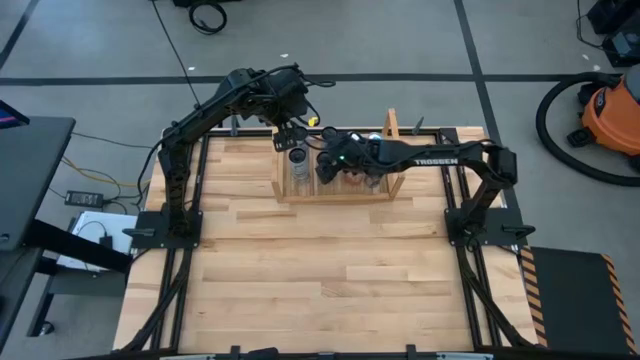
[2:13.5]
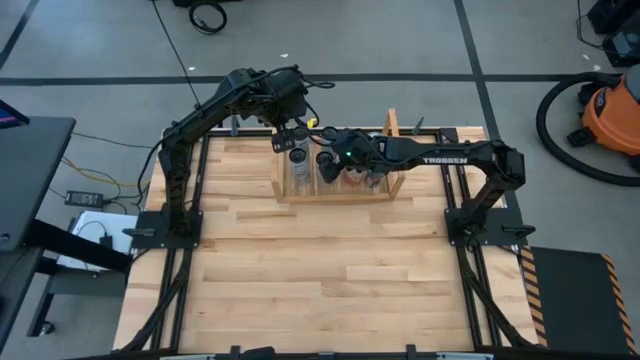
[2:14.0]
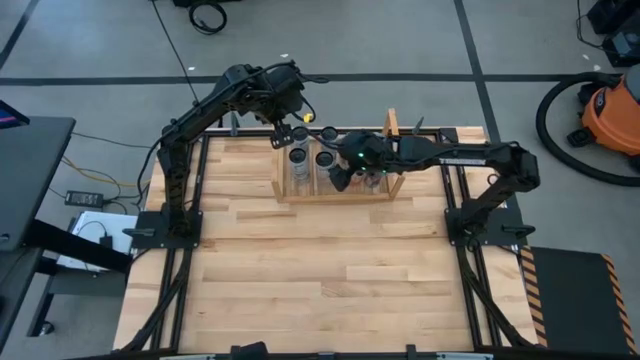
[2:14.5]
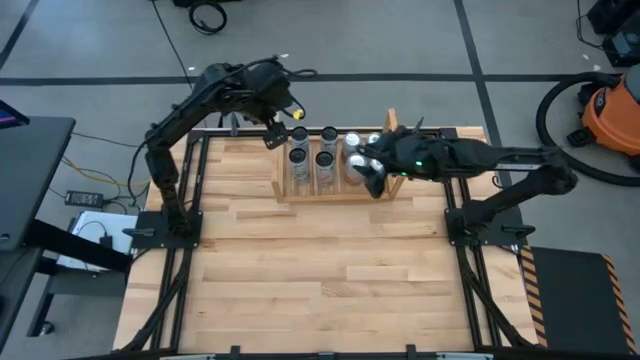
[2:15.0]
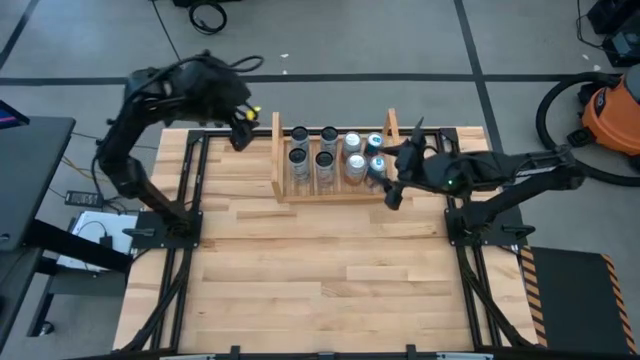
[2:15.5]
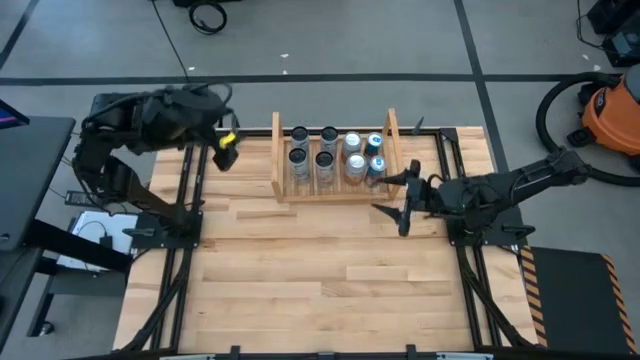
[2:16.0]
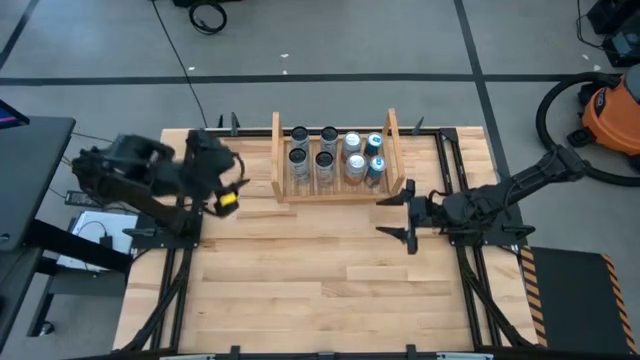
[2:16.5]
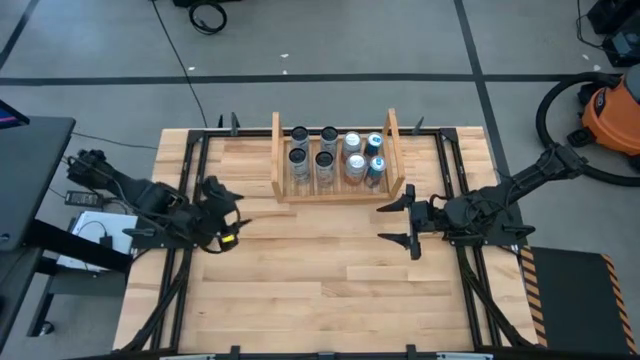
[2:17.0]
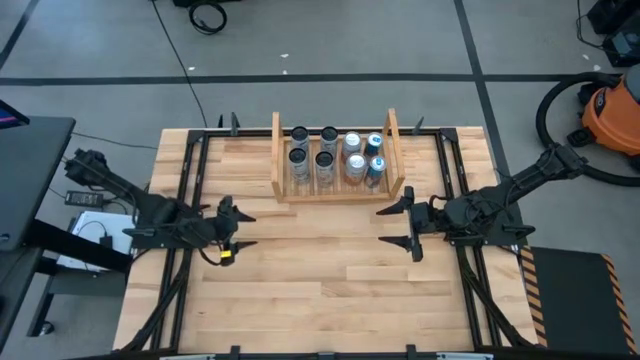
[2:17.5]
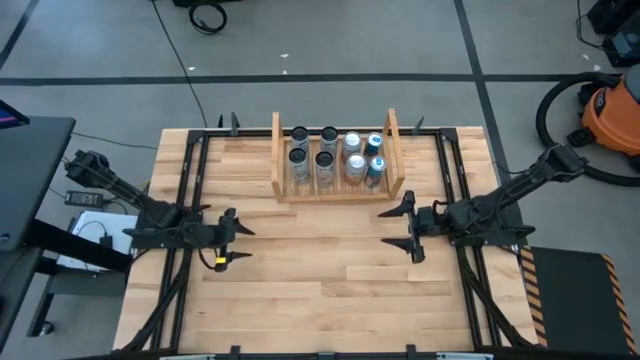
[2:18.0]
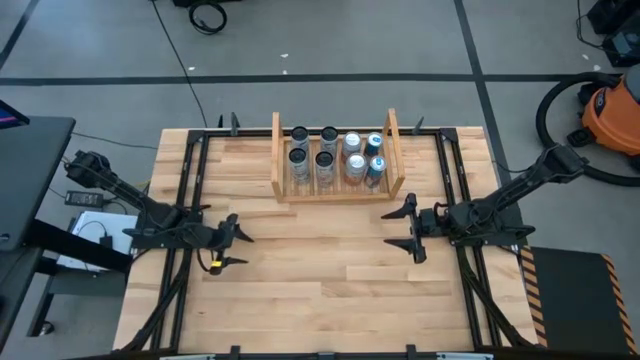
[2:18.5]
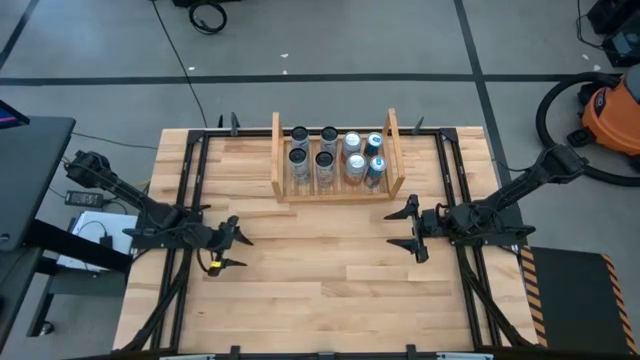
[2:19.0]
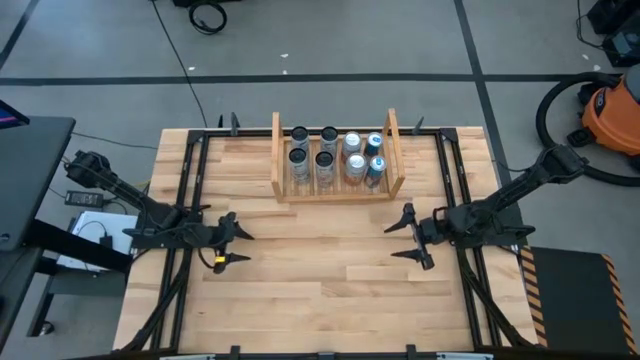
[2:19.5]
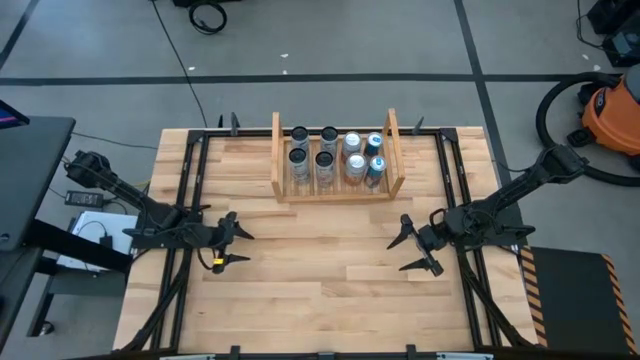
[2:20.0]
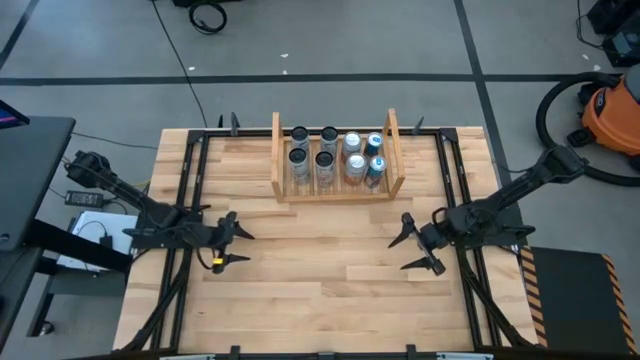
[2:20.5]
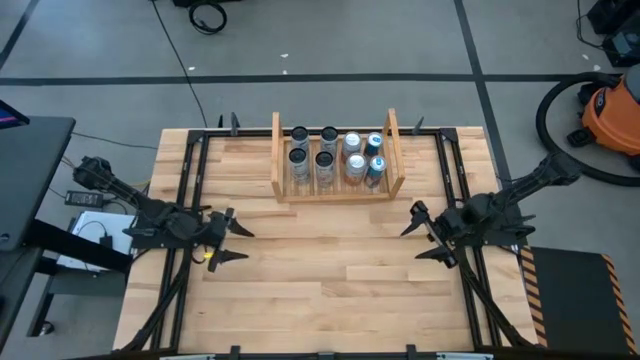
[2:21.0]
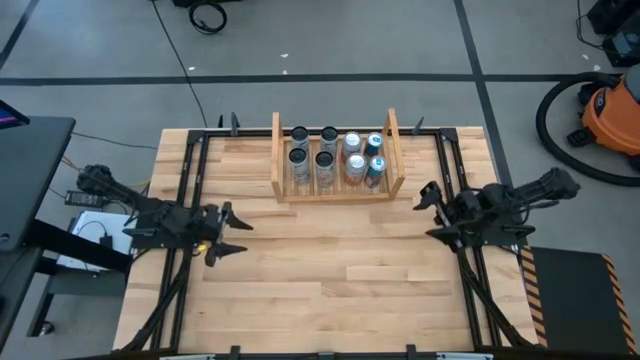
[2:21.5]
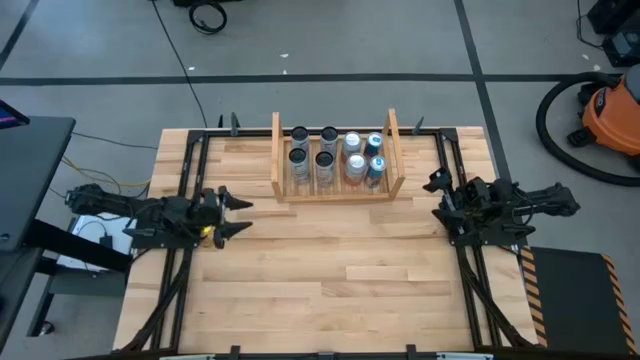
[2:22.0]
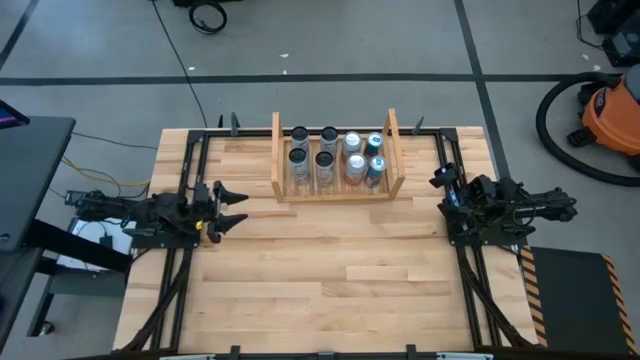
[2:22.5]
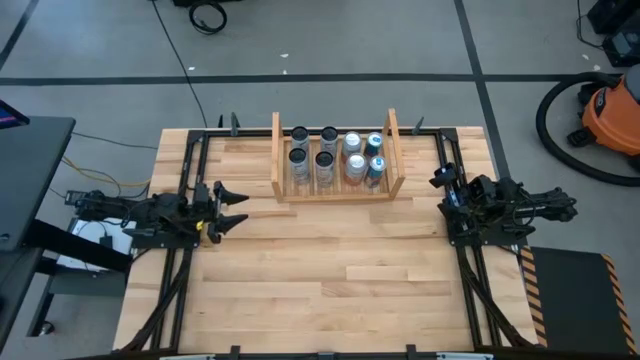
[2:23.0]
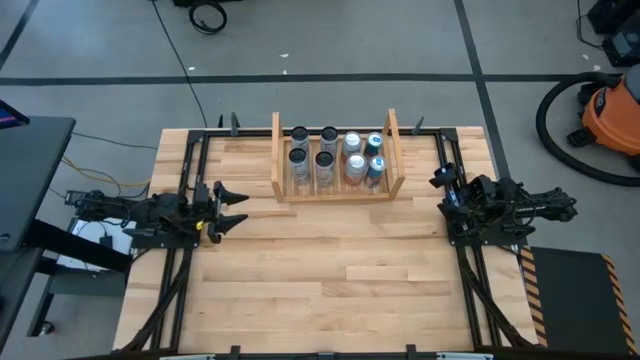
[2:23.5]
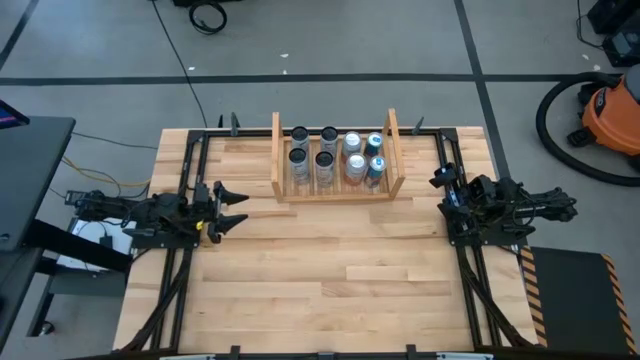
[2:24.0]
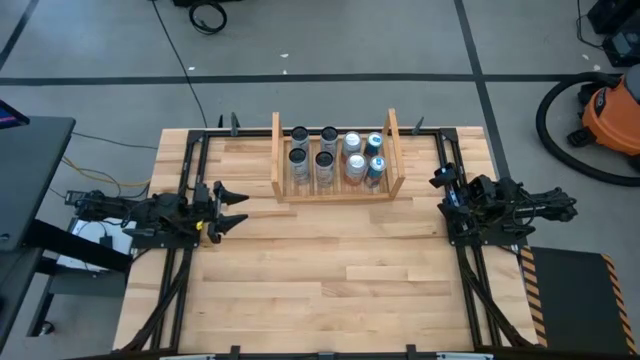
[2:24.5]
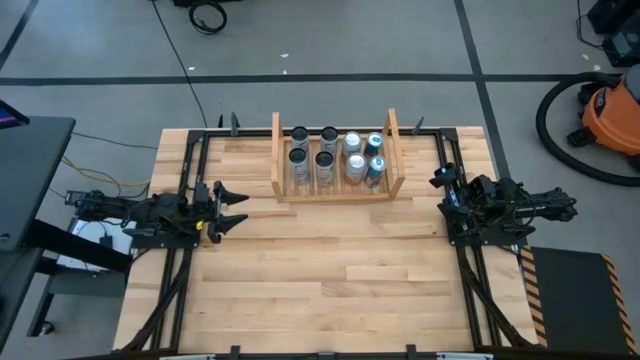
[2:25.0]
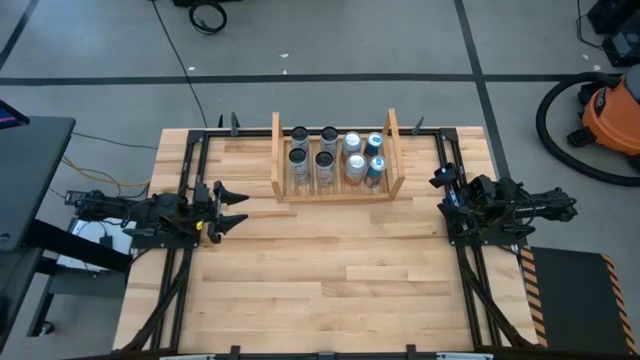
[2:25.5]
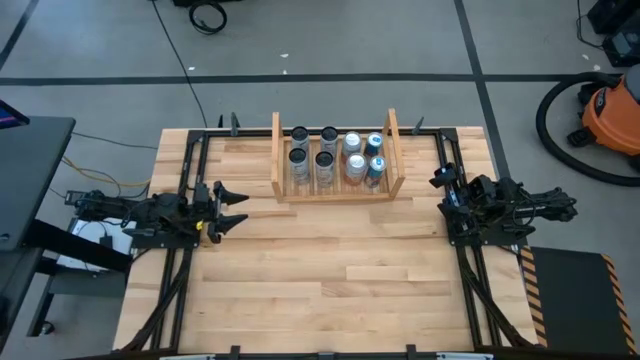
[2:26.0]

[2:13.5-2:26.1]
Task: Place canned beverage on shelf
Return to Home Position
